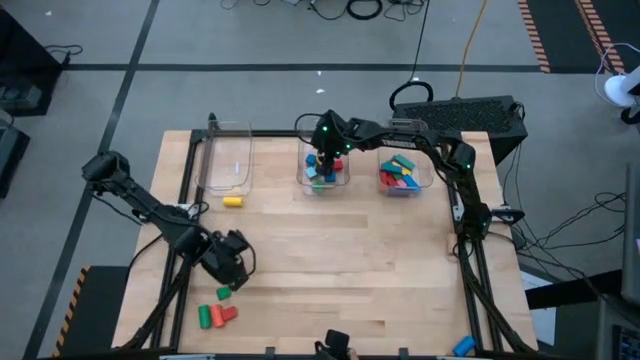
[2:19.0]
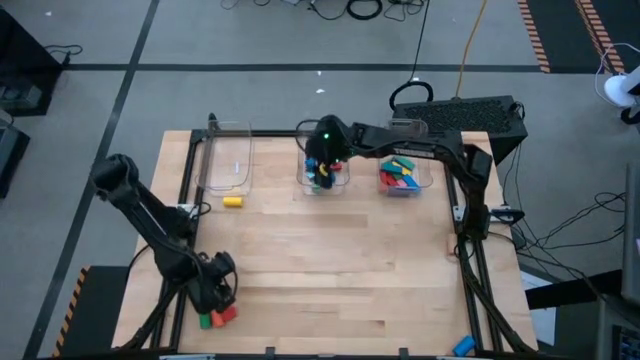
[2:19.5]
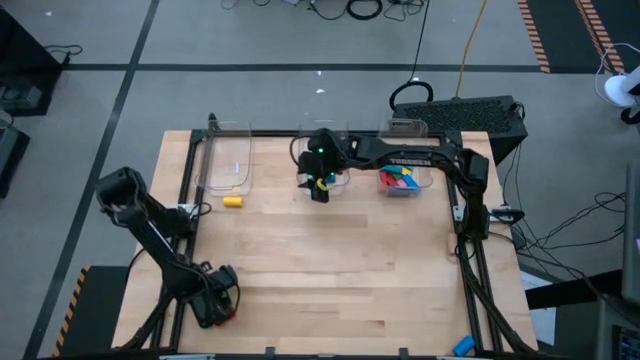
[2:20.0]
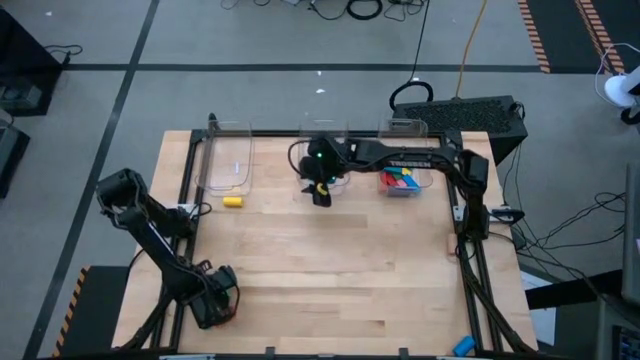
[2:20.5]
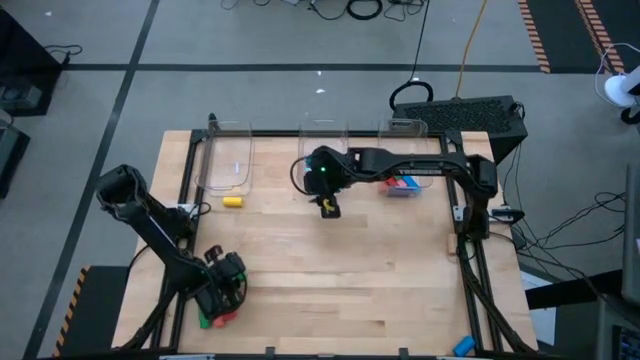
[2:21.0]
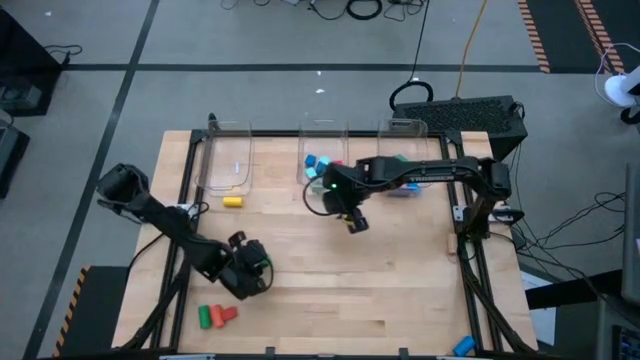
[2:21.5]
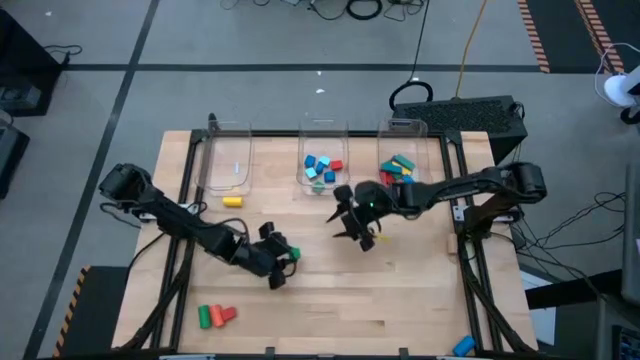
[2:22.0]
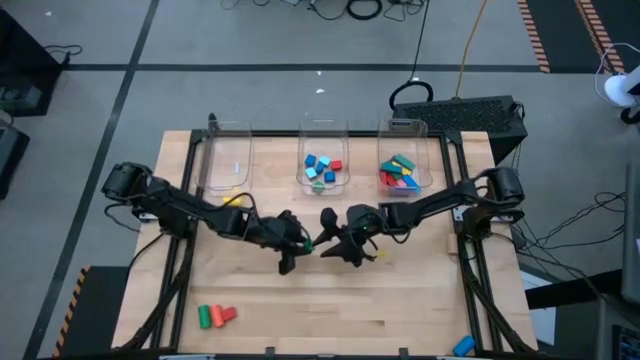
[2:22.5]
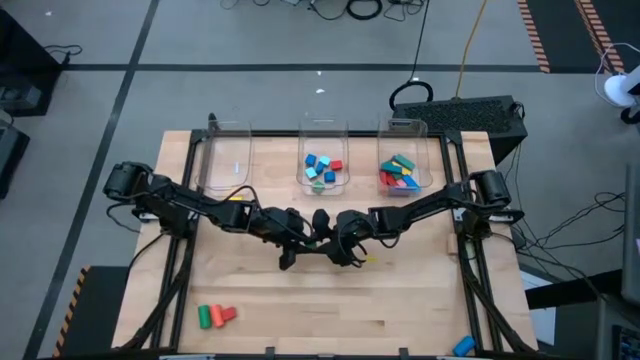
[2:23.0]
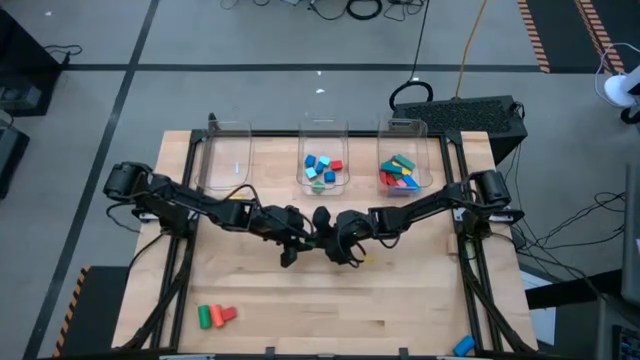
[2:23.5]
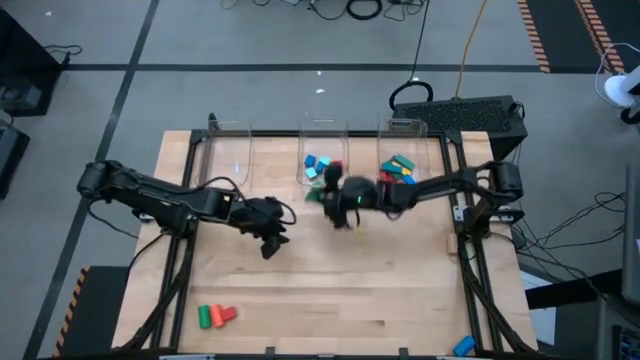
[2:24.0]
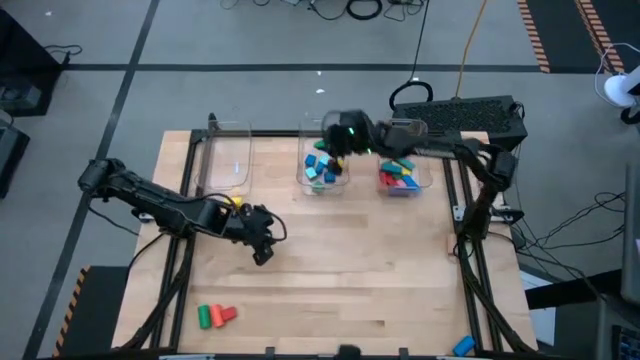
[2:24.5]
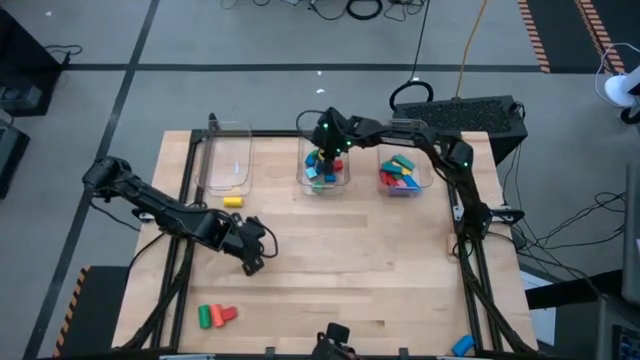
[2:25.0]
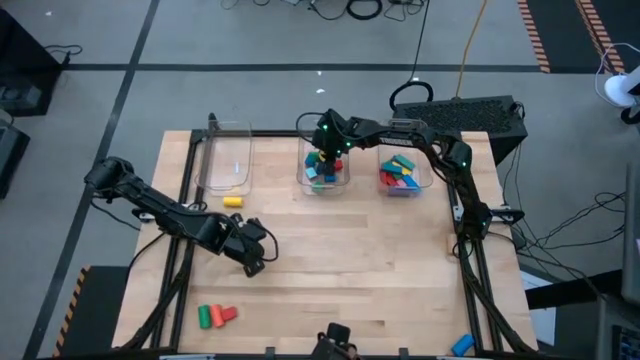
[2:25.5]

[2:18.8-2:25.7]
Task: Sort blocks by size
Put the green half circle block into the center transparent bin

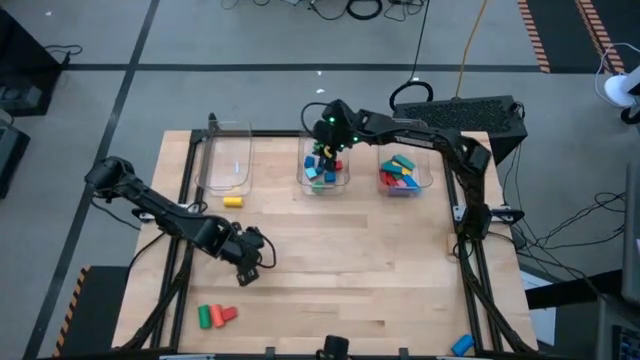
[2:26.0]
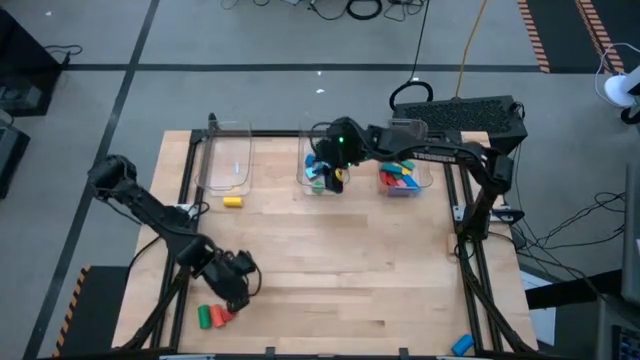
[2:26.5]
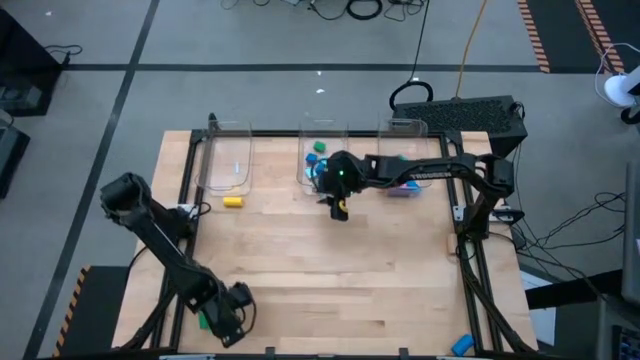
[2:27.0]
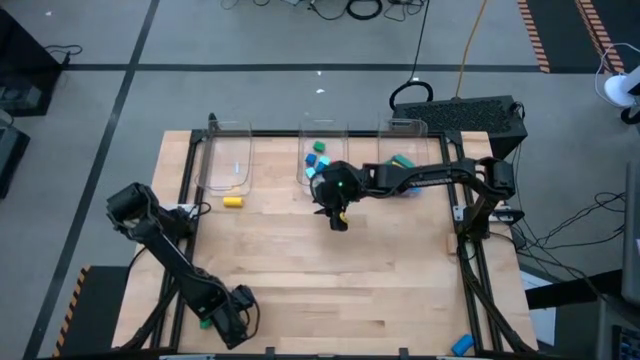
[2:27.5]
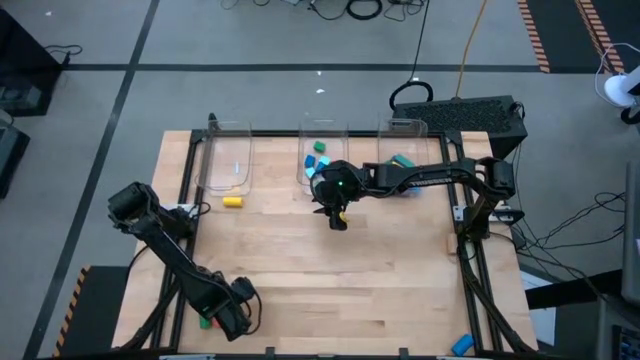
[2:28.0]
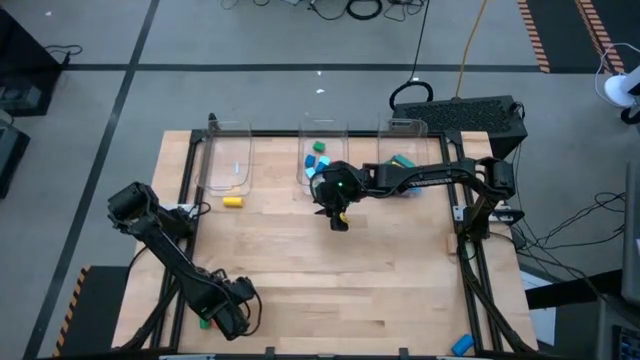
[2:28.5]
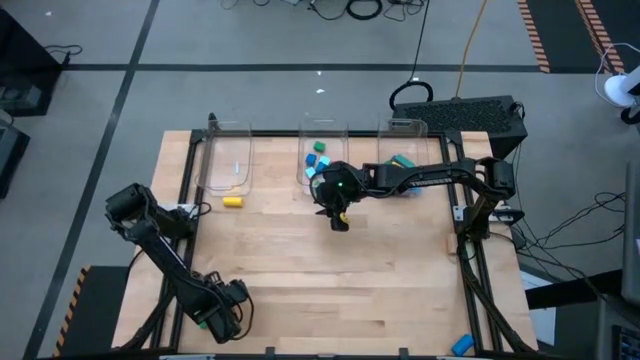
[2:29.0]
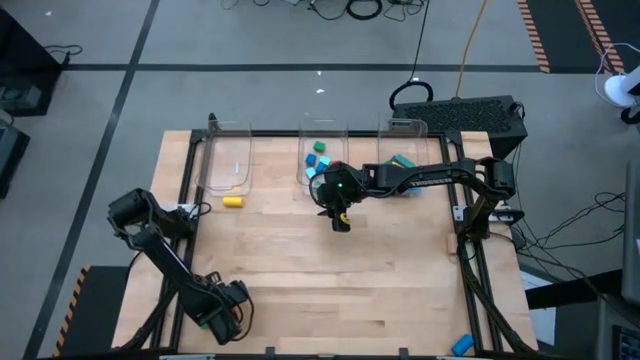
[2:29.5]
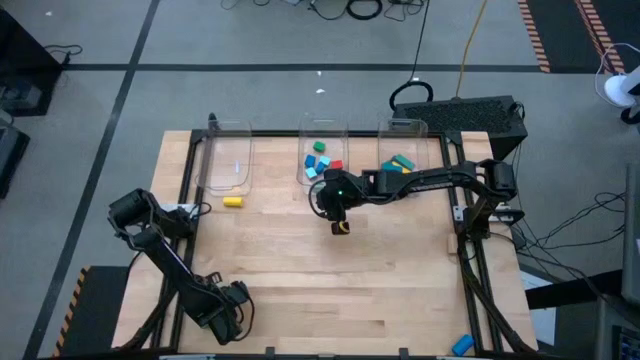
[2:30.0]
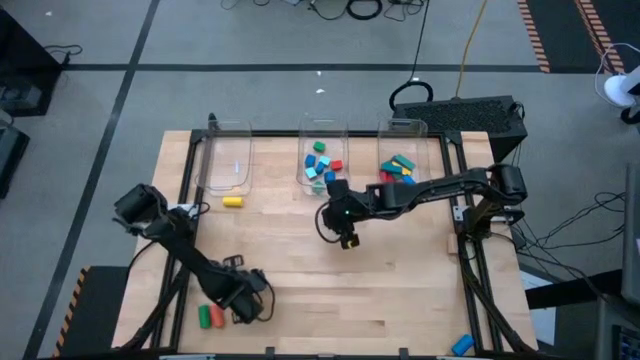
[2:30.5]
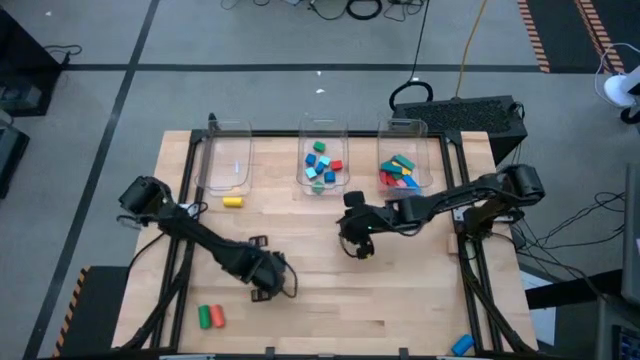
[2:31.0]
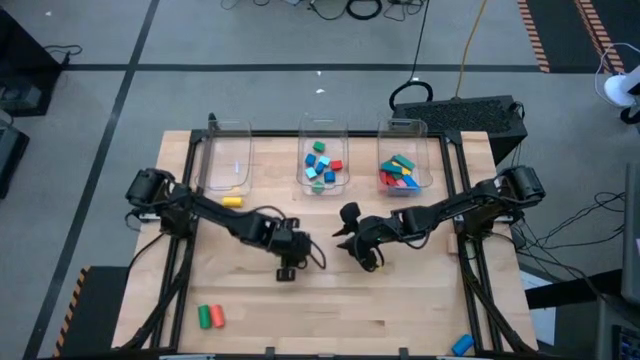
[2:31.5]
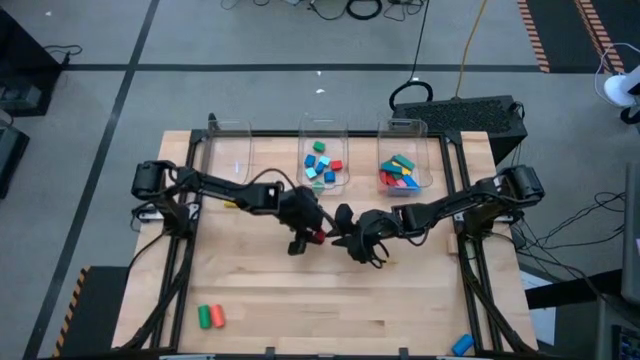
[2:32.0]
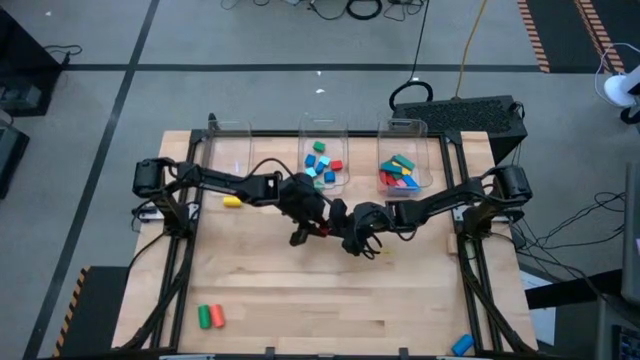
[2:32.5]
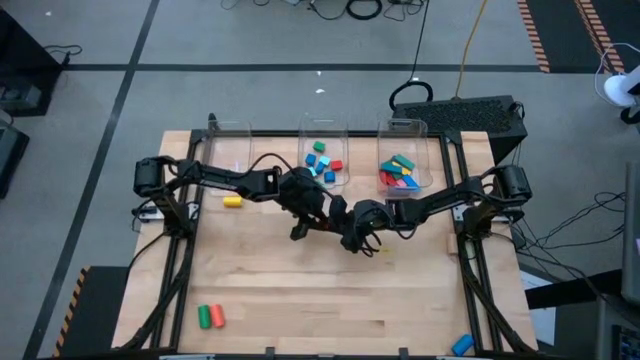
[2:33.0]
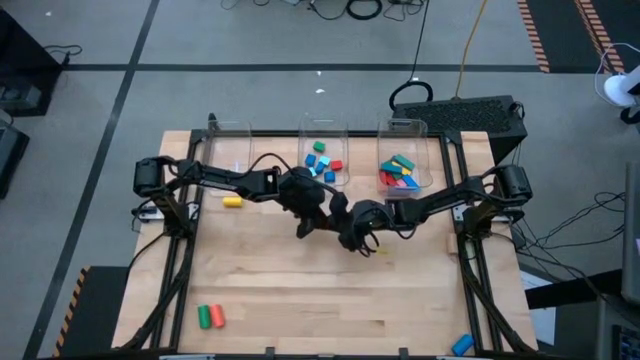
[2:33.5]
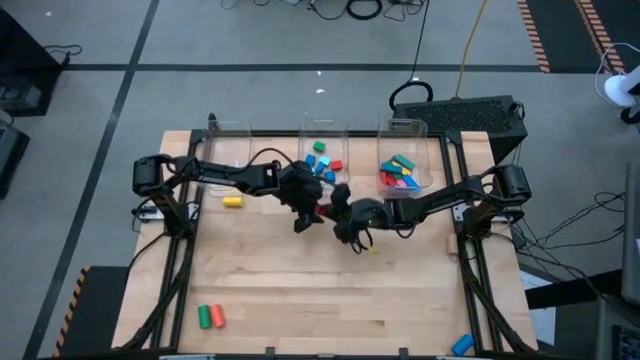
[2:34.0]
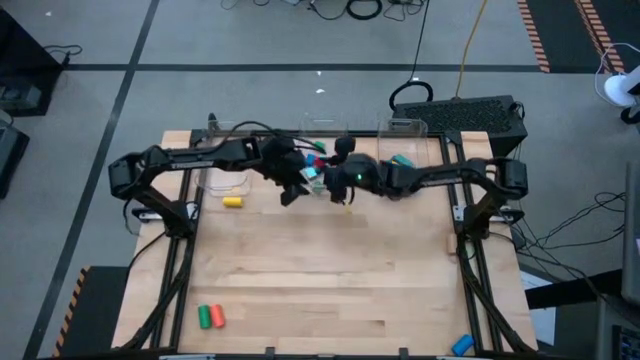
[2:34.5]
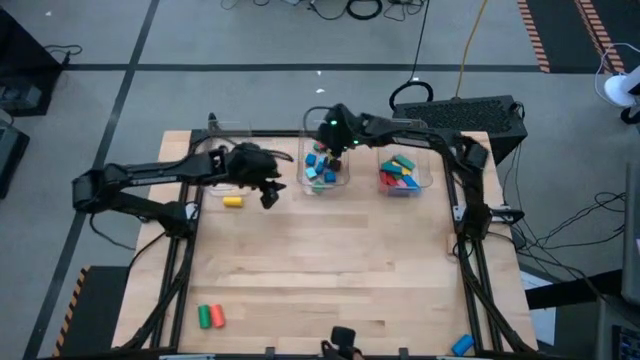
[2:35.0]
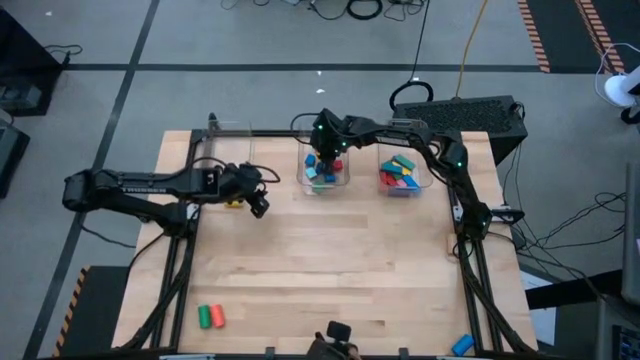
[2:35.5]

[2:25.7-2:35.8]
Put the red half circle block into the center transparent bin

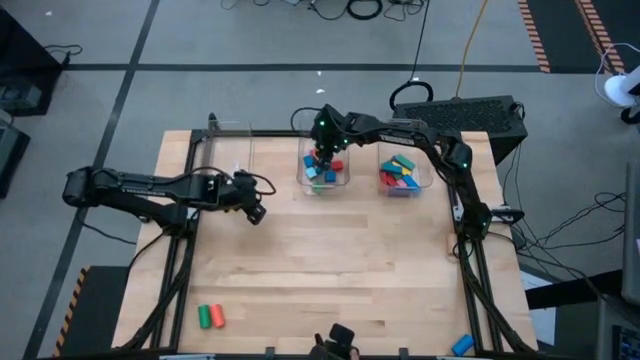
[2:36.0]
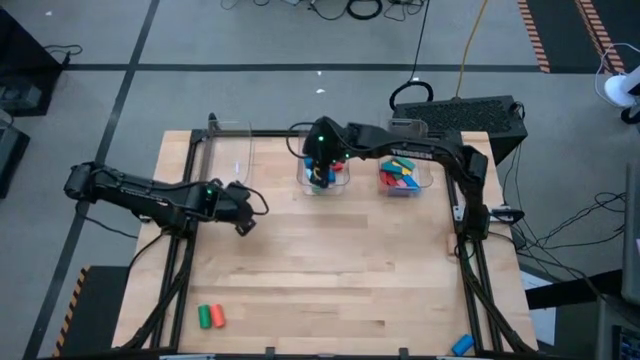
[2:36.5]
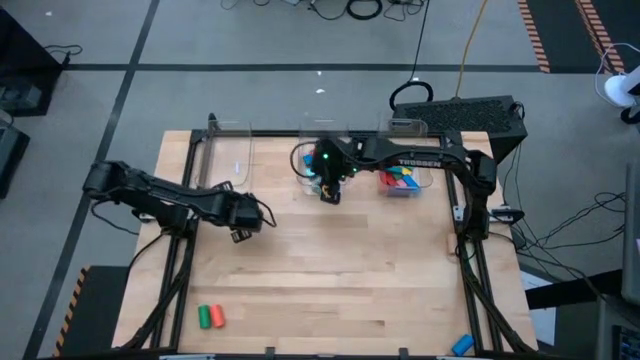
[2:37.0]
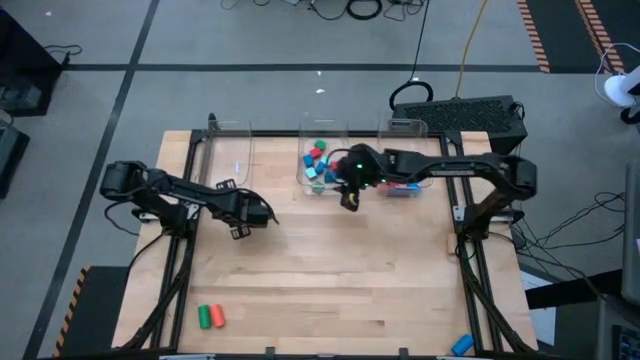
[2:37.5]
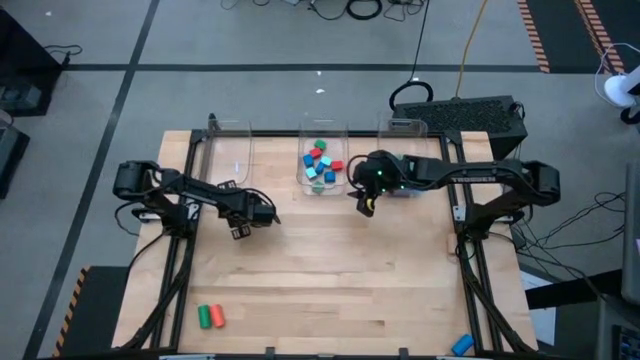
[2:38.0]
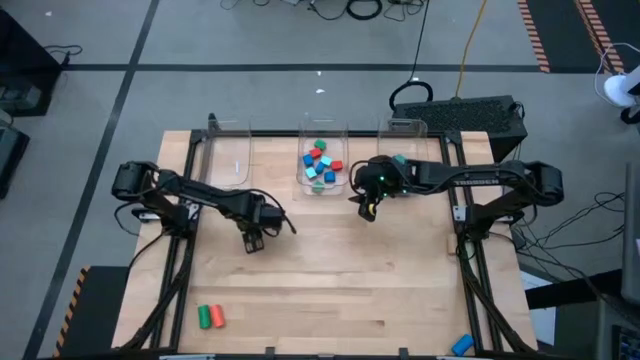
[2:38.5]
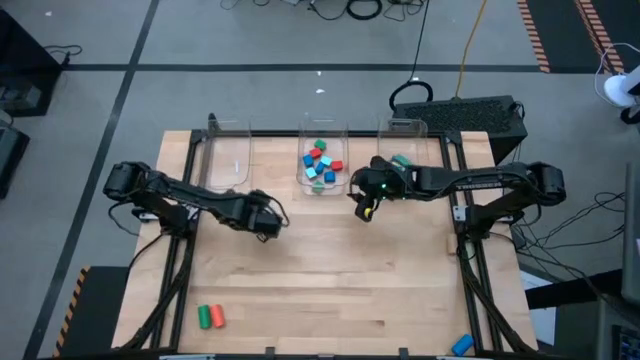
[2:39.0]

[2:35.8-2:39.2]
Put the yellow cylindrical block into the left transparent bin
